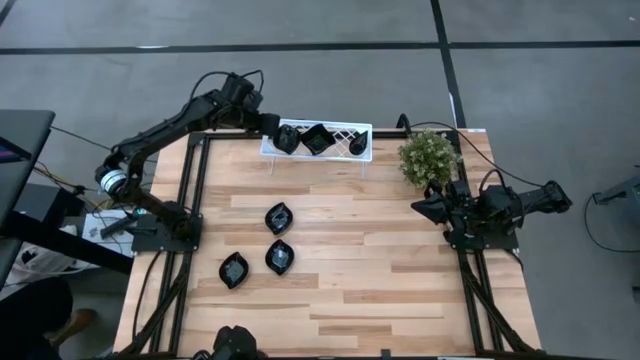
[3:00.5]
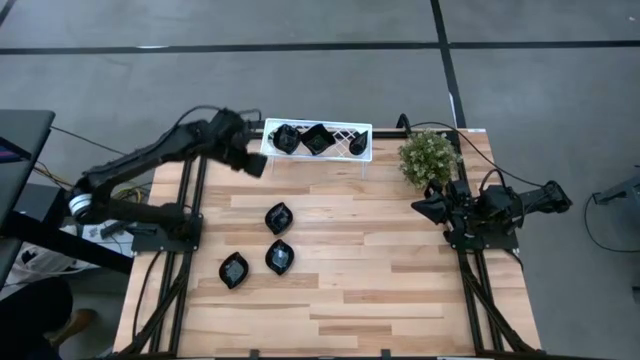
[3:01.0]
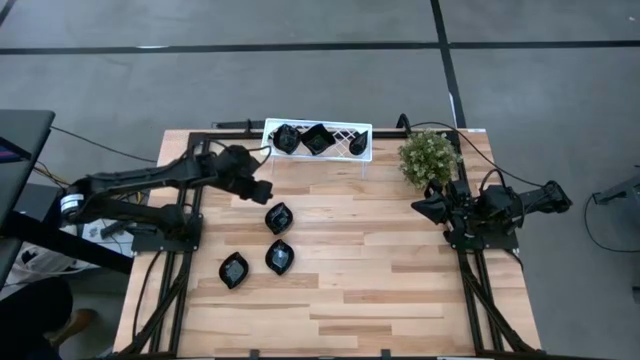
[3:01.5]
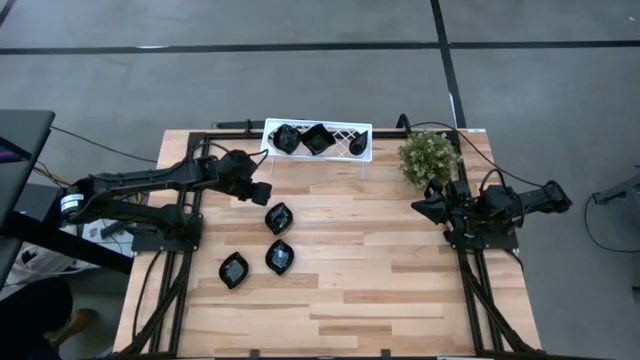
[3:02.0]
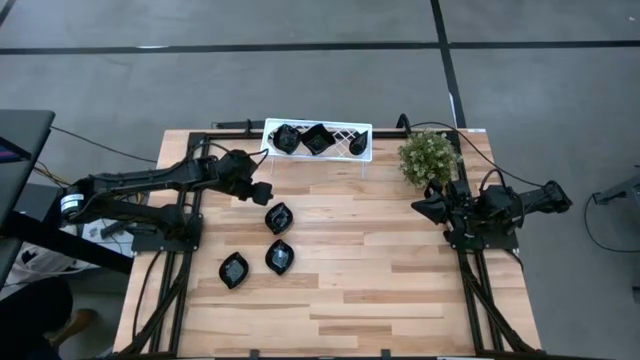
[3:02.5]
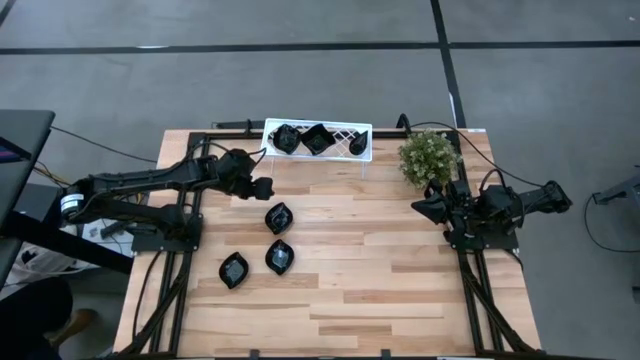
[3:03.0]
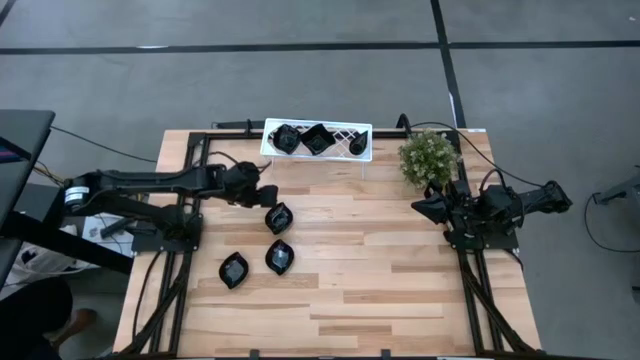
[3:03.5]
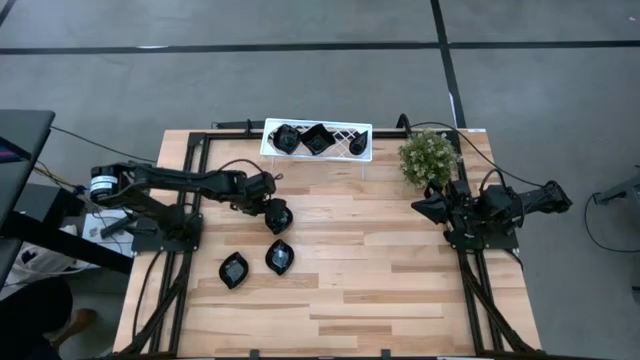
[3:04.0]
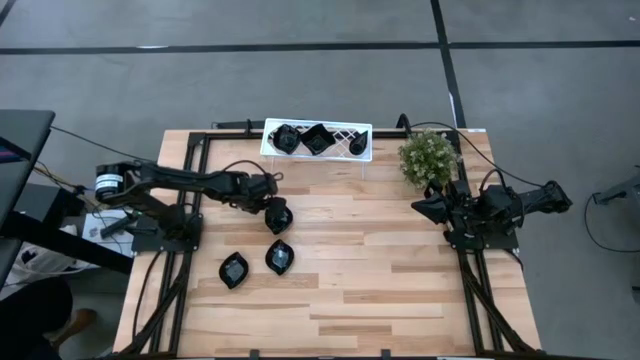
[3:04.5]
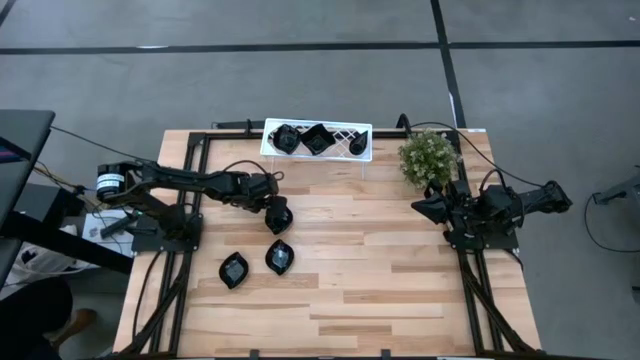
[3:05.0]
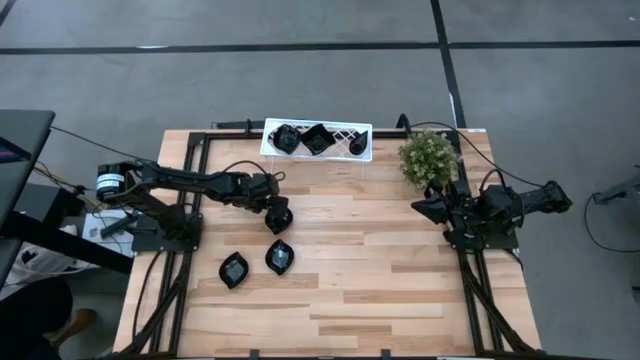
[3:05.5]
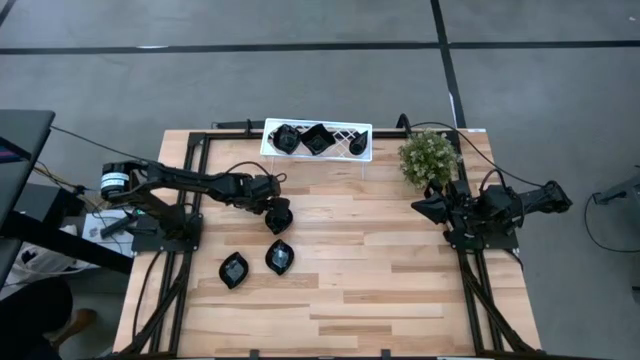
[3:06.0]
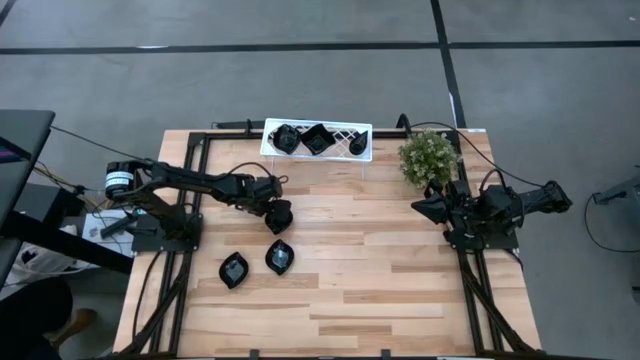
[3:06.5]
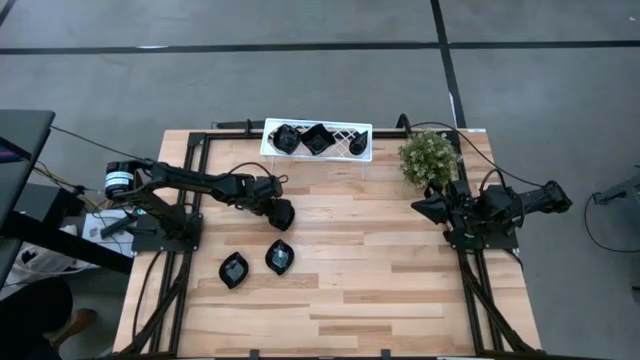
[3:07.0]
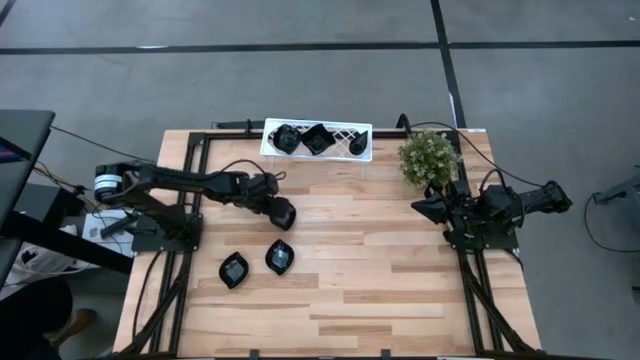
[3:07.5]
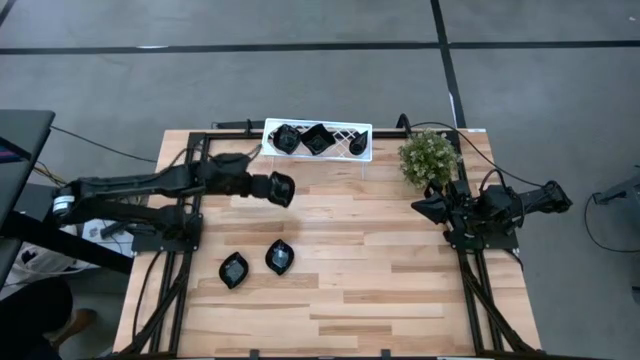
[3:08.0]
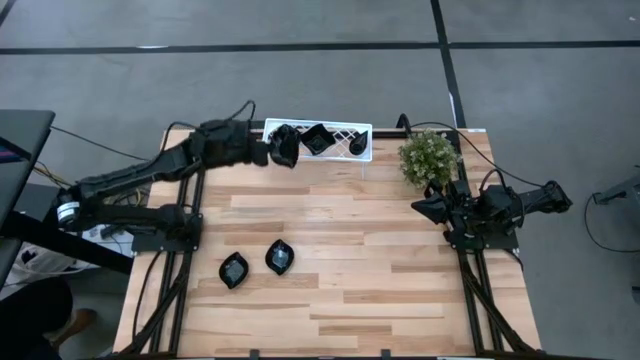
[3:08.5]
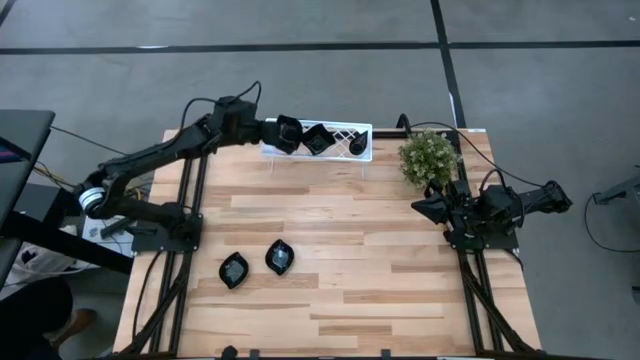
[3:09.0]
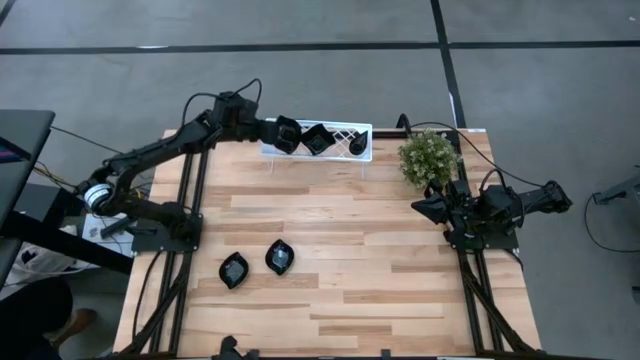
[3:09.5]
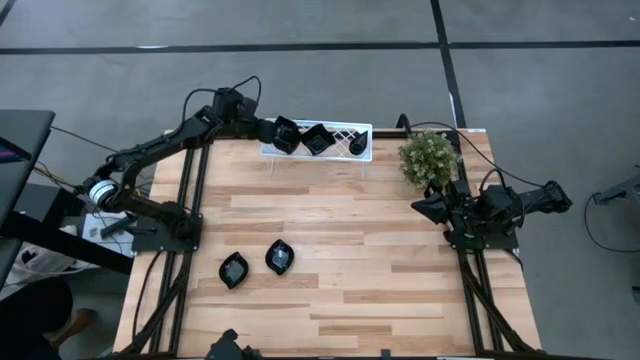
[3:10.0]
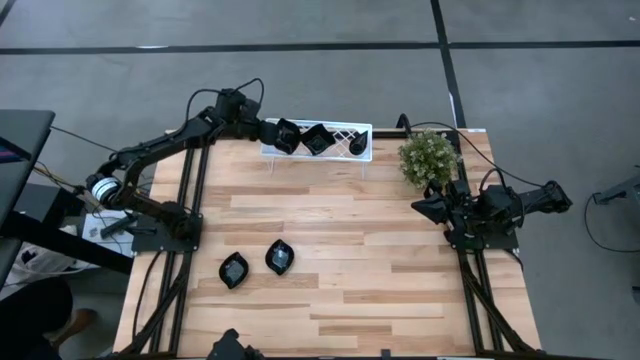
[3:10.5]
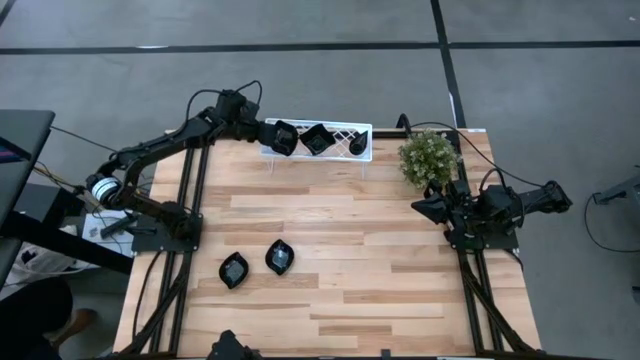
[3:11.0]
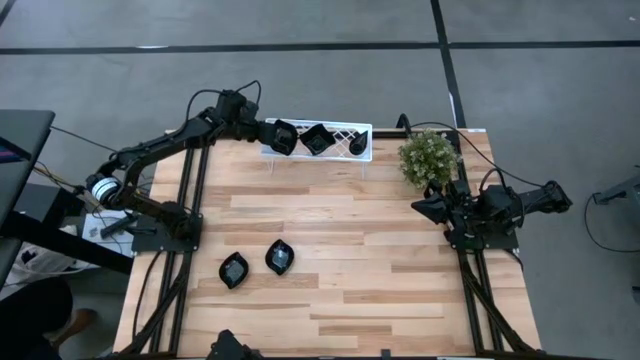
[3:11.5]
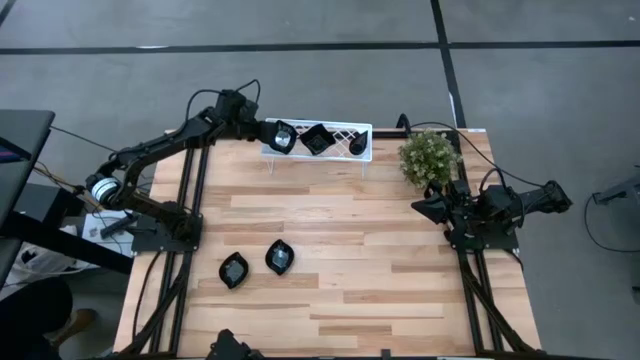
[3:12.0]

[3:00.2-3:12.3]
Task: Pick & Place Mini shaped plates
Stack the black leaf shaped plate on top of the black leaf shaped plate on the shelf

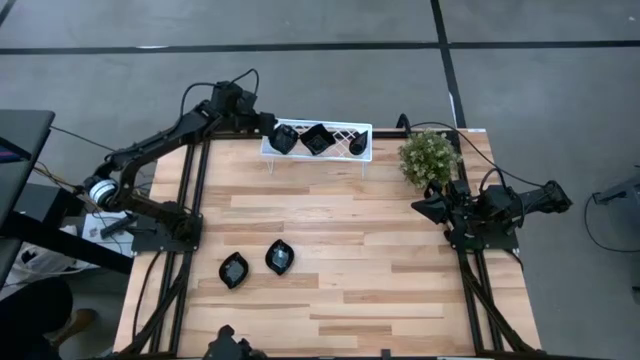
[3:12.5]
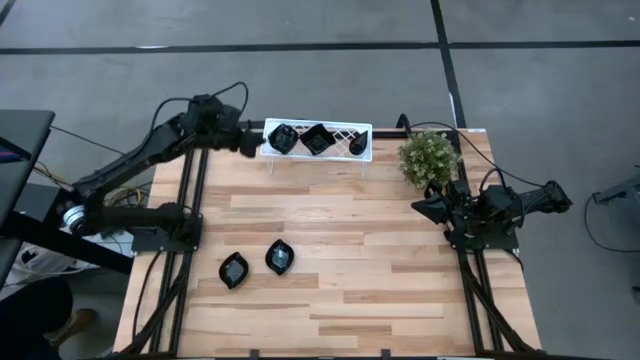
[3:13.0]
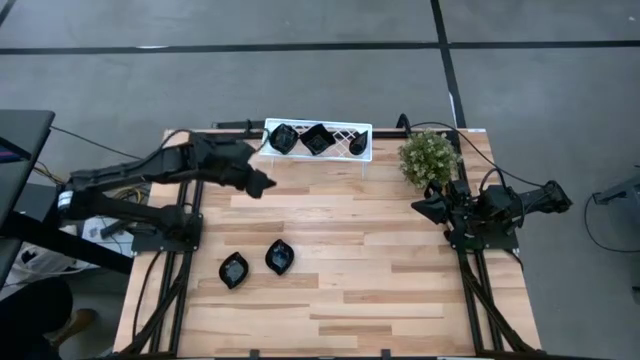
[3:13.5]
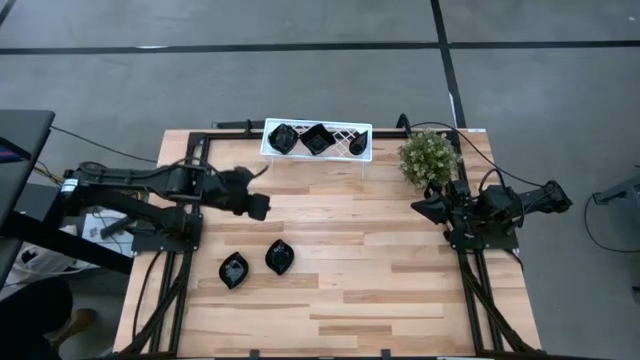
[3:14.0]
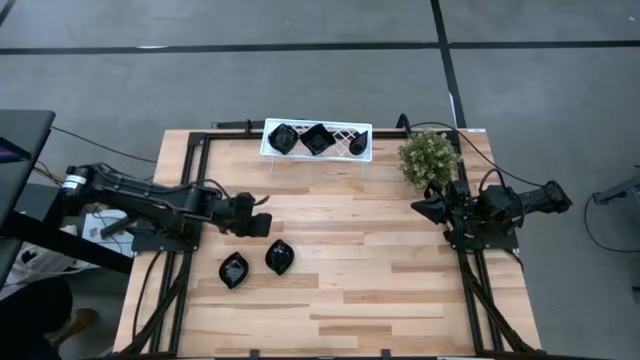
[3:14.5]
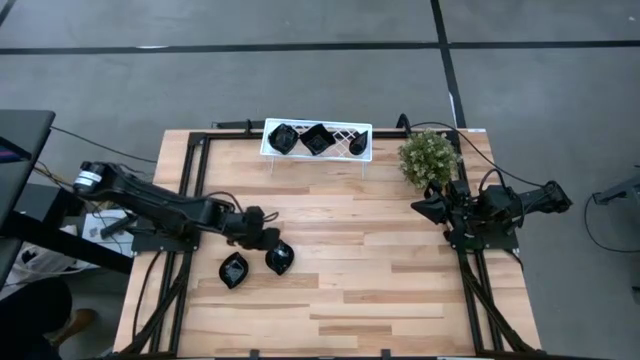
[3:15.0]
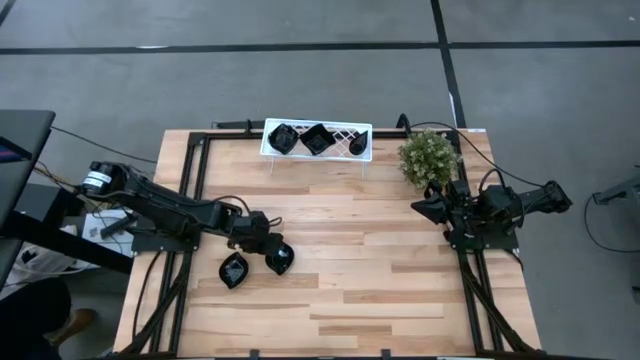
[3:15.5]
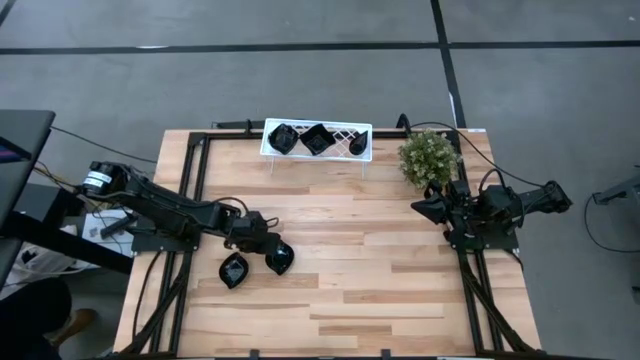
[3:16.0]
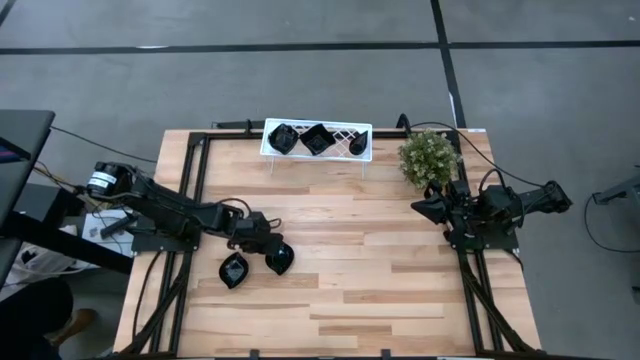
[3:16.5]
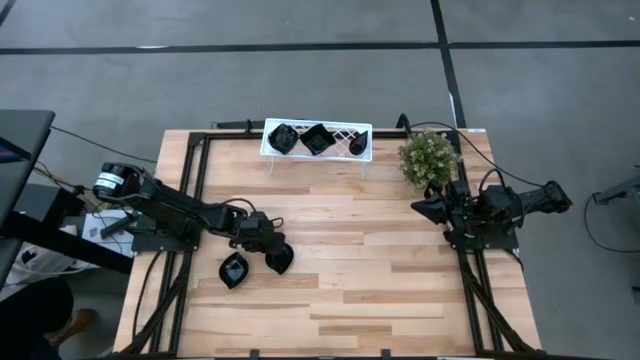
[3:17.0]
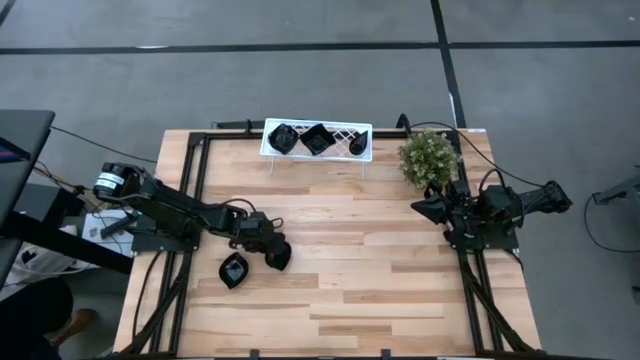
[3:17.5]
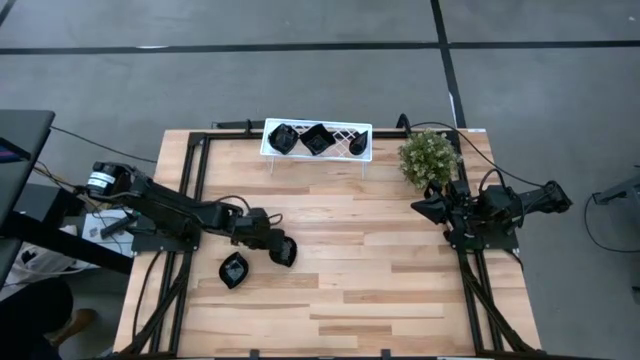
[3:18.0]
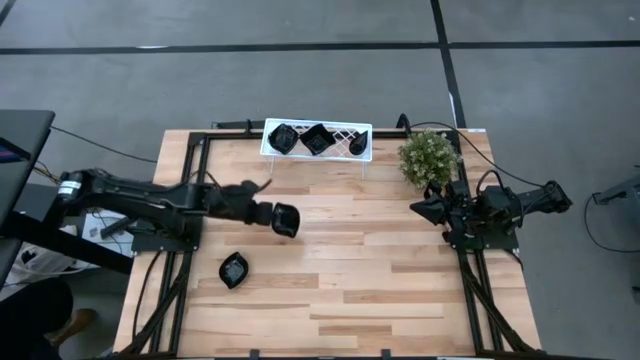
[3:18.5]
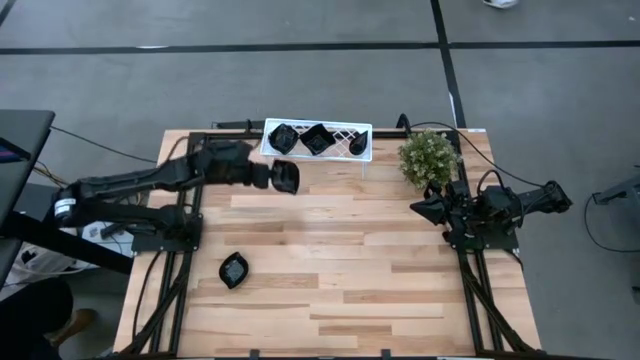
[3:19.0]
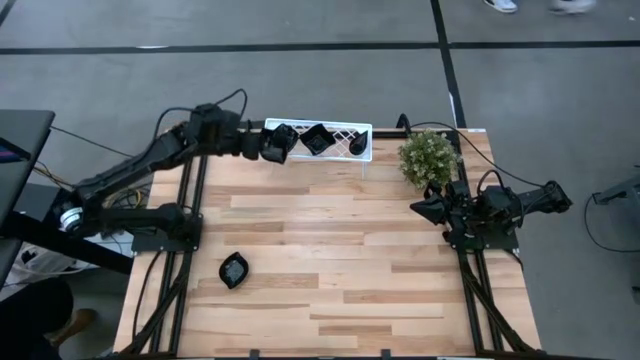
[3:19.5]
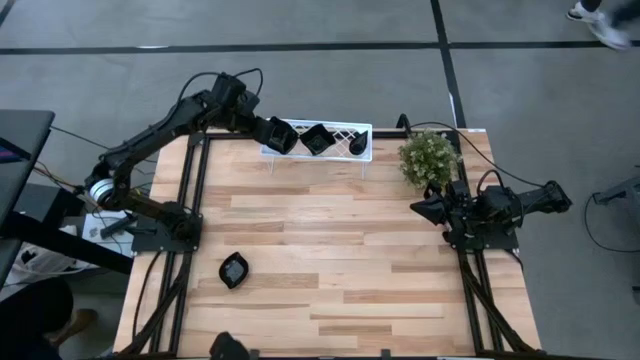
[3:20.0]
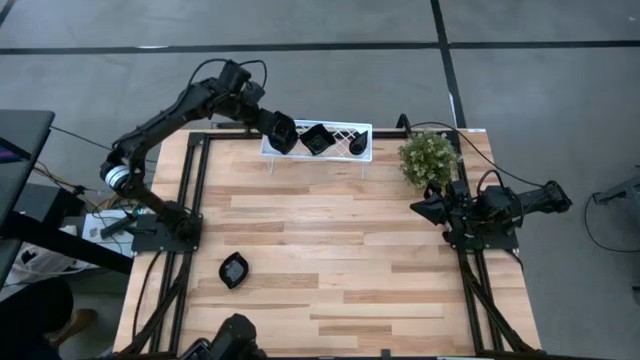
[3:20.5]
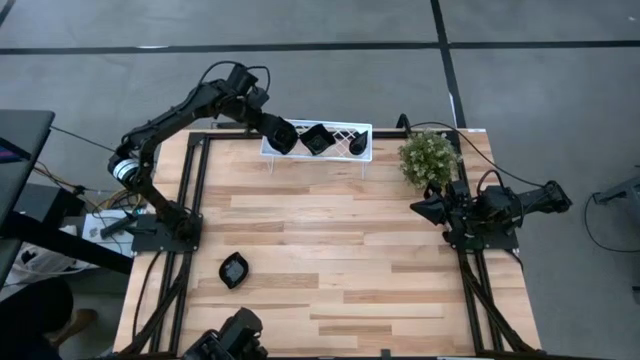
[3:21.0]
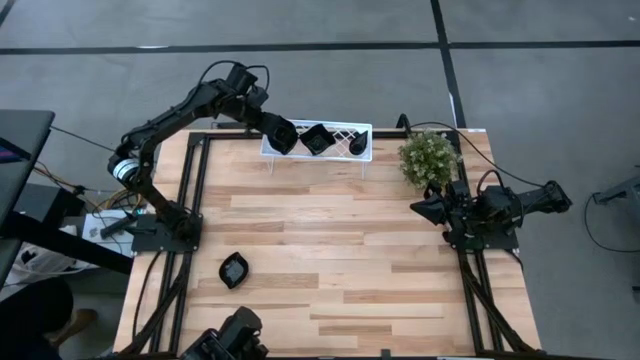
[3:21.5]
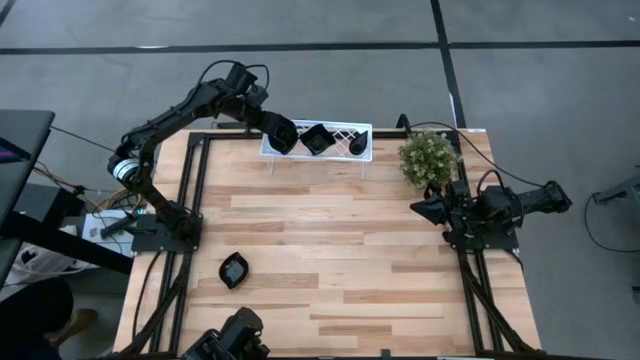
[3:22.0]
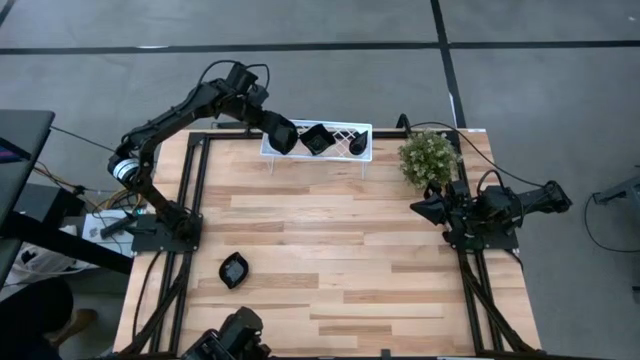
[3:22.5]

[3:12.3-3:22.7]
Stack the black leaf shaped plate on top of the black leaf shaped plate on the shelf
